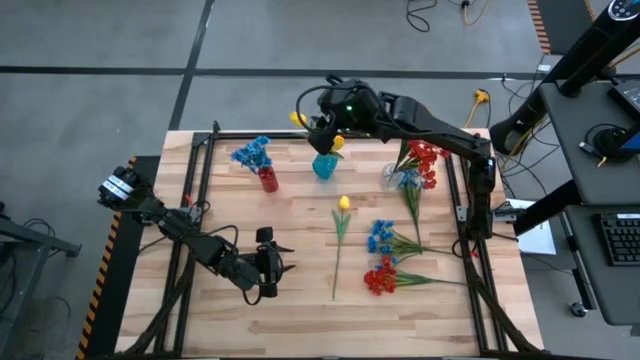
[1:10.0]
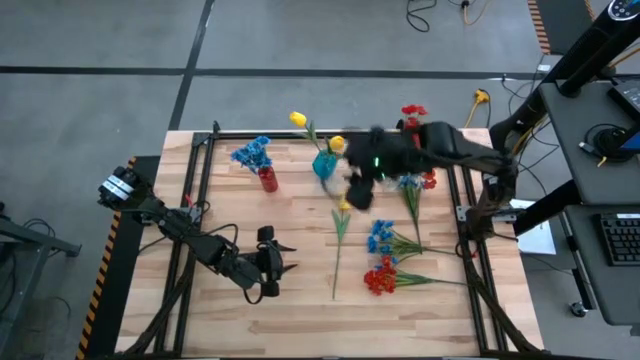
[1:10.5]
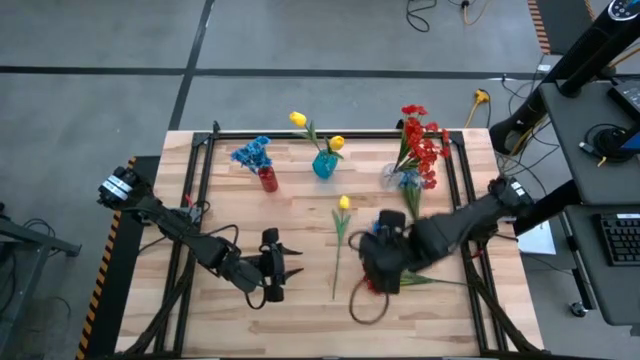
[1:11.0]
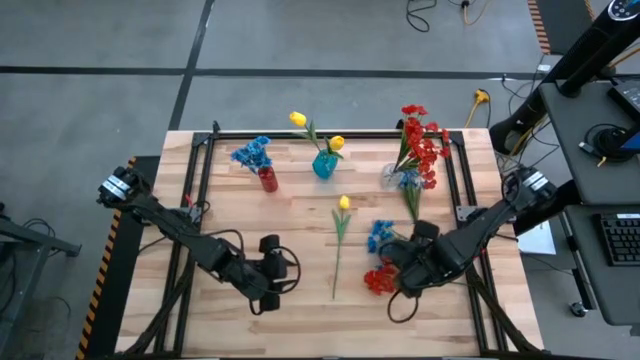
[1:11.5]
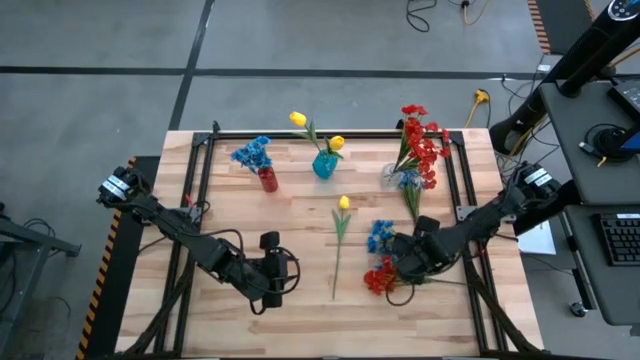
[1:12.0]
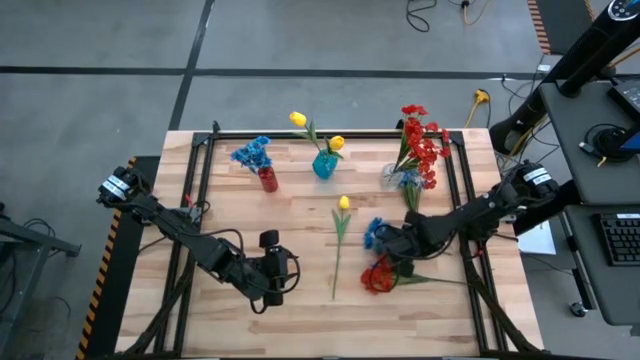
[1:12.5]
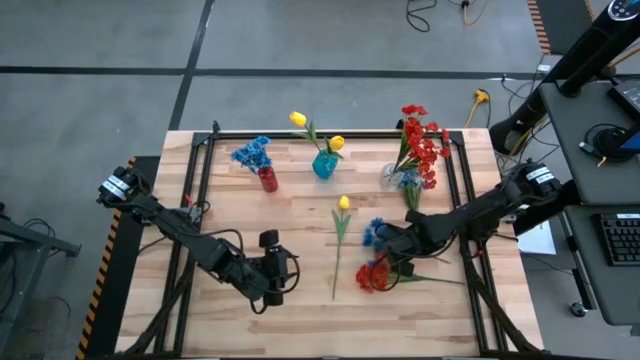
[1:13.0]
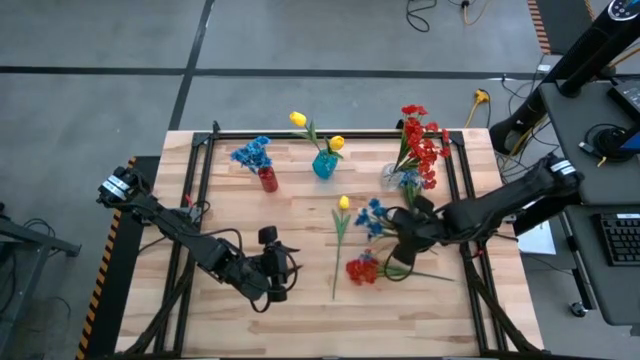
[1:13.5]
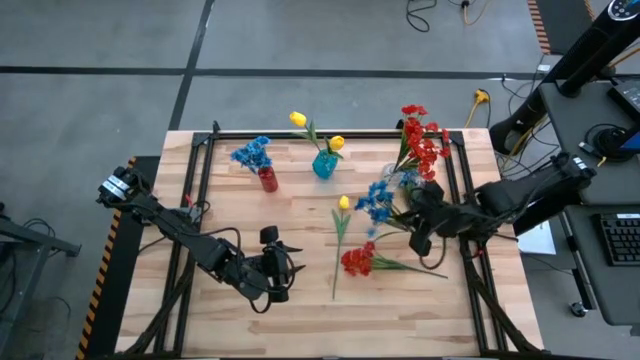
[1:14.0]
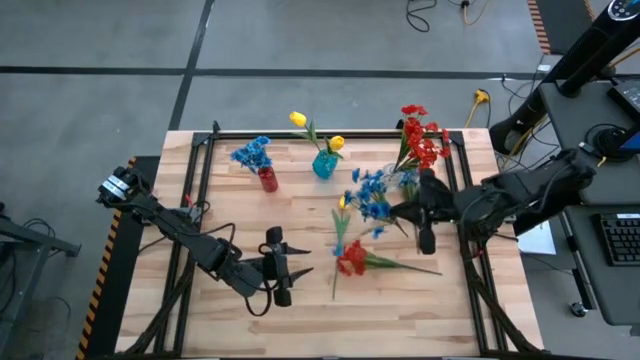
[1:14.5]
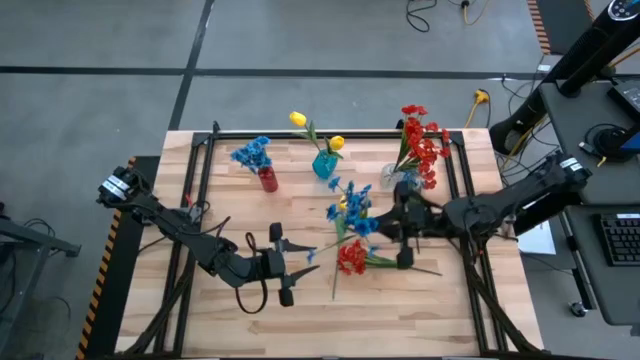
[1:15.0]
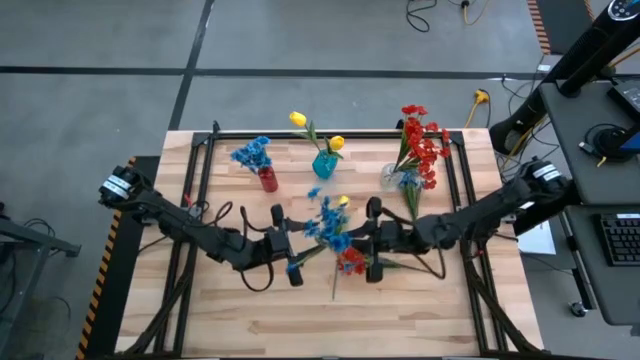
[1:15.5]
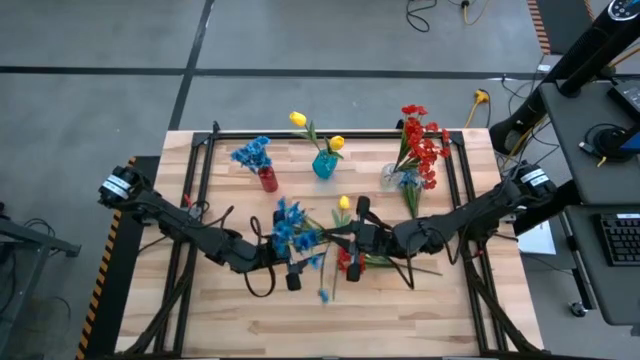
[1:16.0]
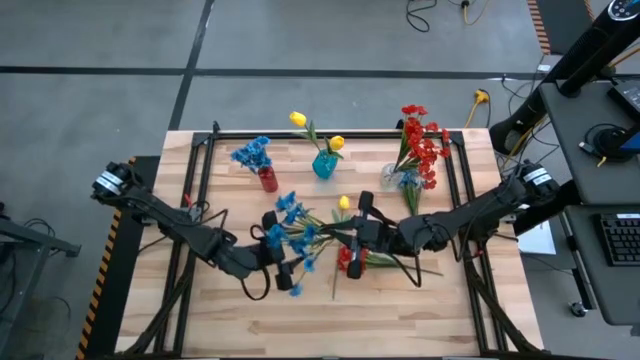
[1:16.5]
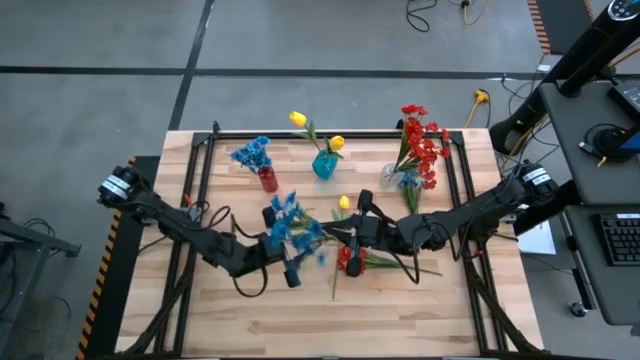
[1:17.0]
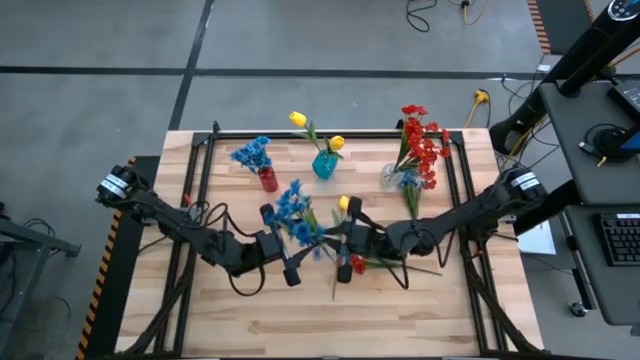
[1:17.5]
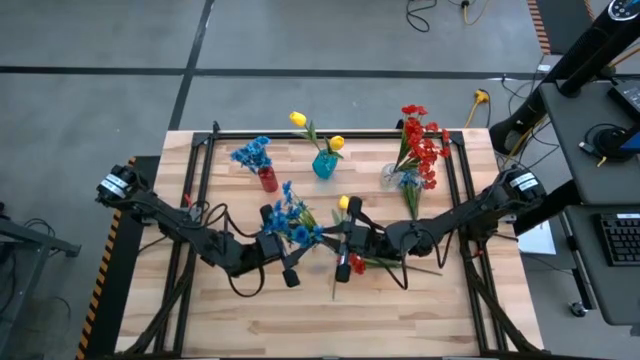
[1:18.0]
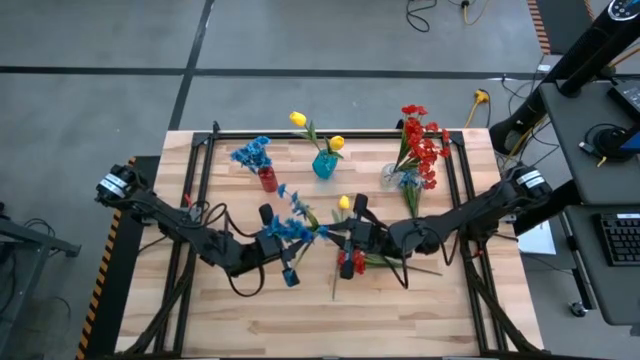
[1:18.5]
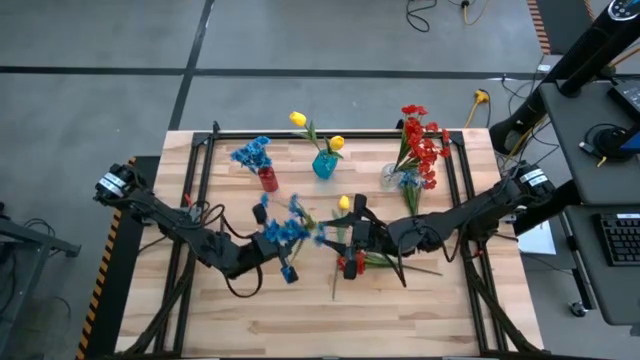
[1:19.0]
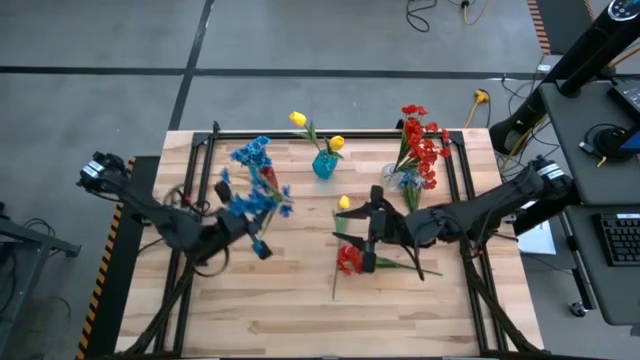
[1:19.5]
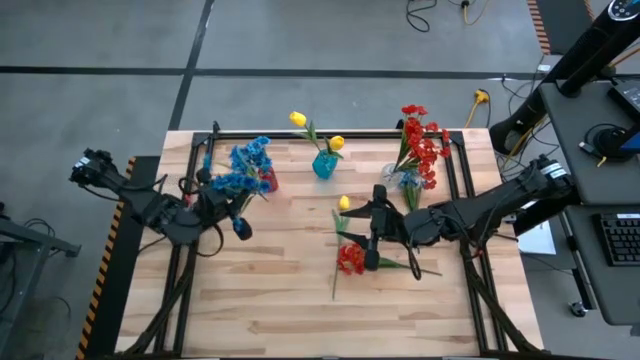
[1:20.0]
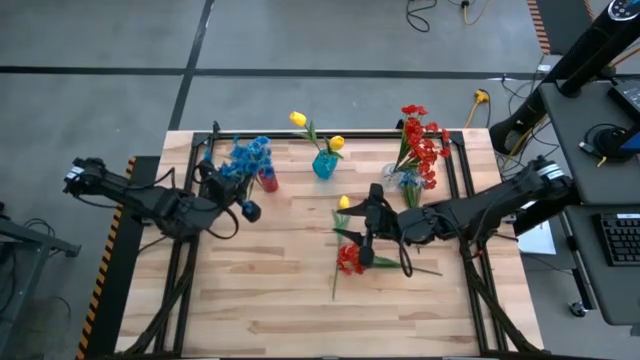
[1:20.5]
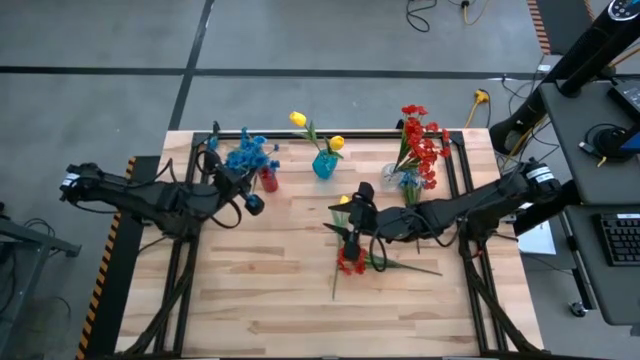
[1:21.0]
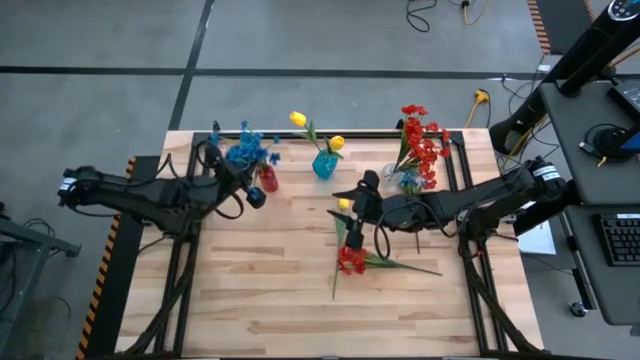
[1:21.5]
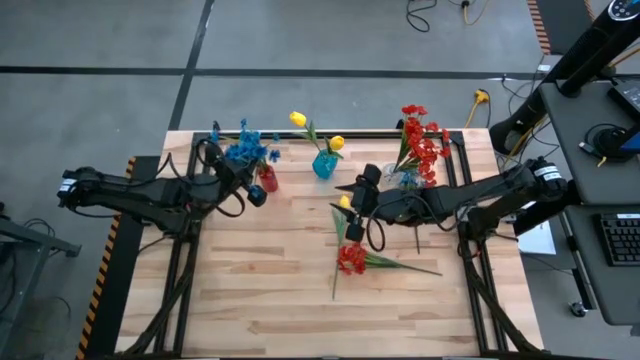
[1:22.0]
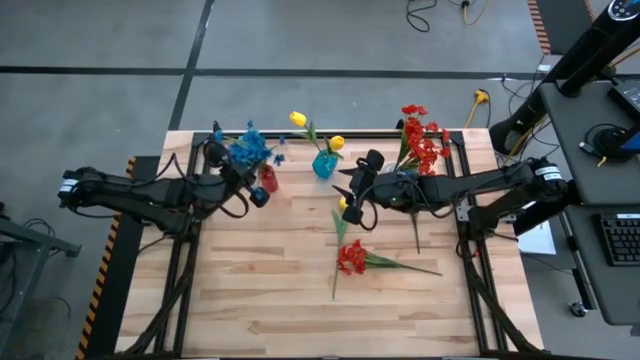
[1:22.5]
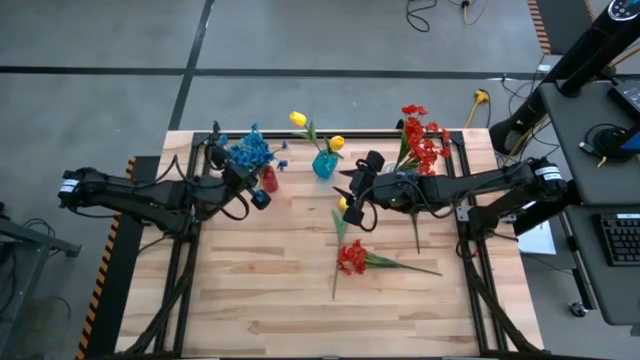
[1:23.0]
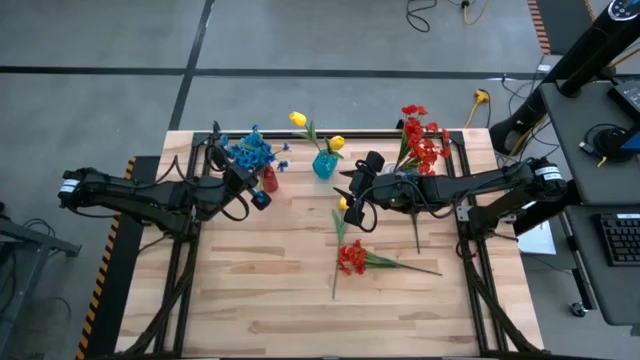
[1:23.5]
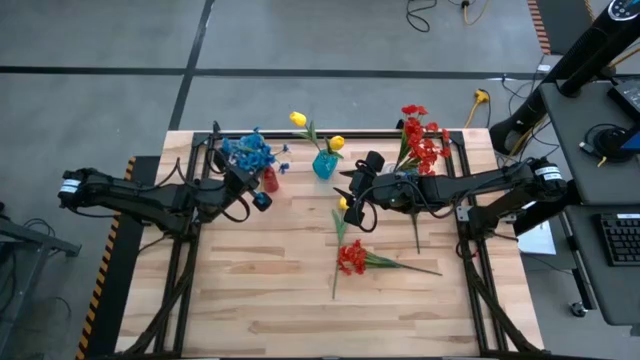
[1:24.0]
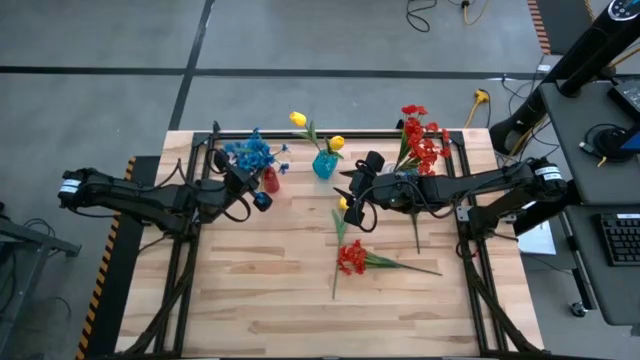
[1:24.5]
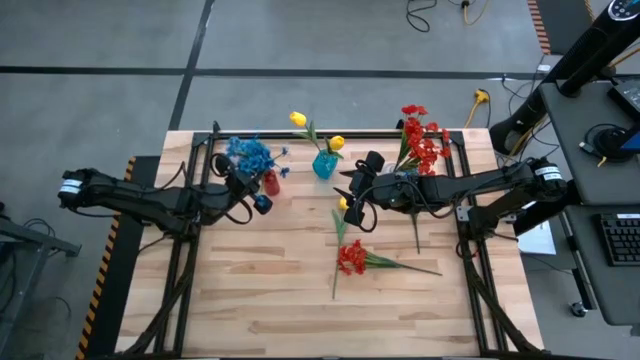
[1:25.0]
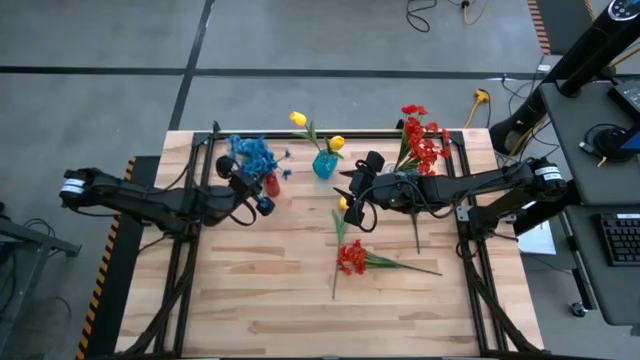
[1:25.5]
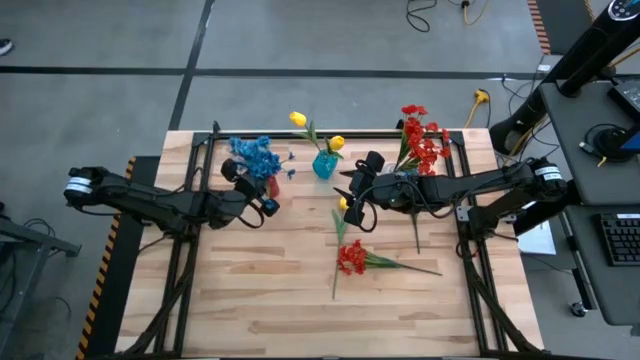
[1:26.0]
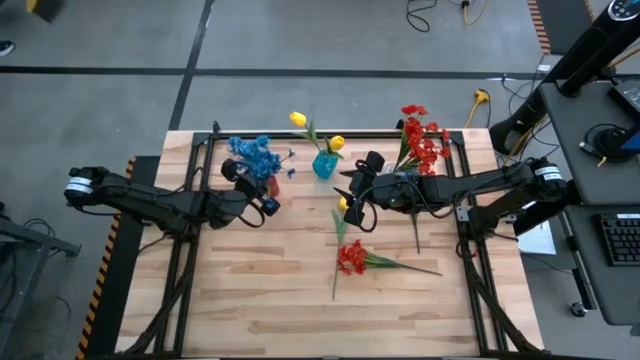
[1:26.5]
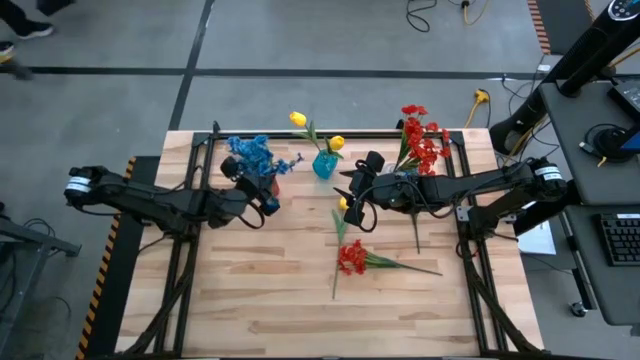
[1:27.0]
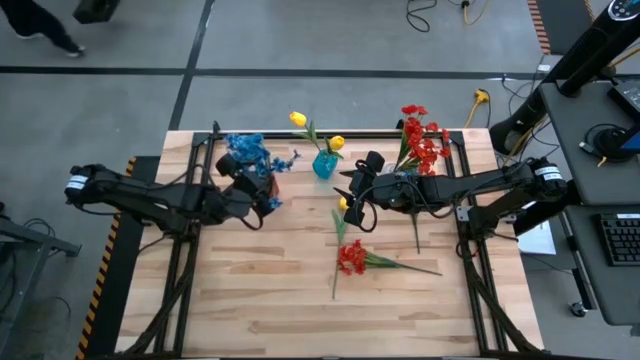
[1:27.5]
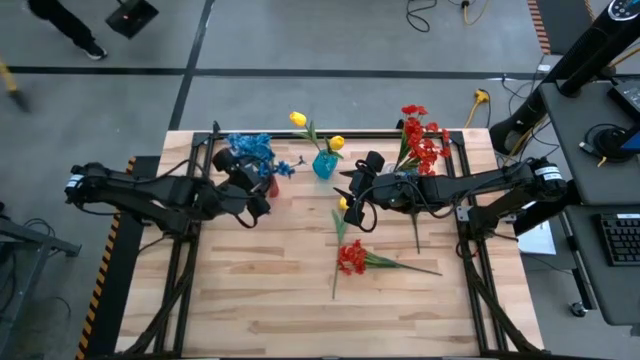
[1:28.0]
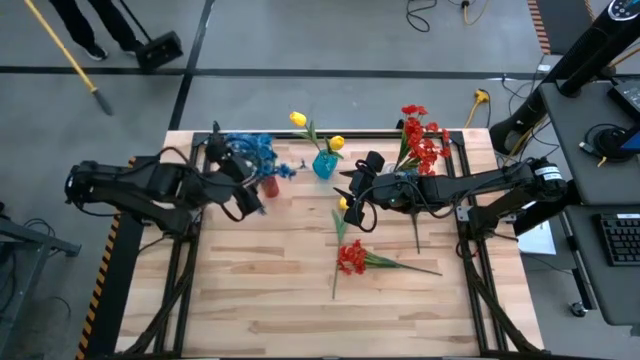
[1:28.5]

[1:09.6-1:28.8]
Task: Sort flowers into vase by color
Put the bottom blue flower into the red vase
